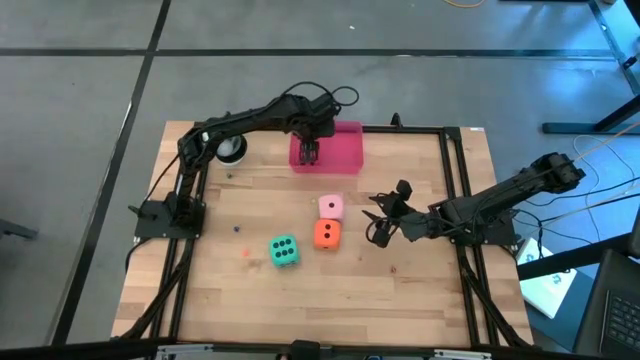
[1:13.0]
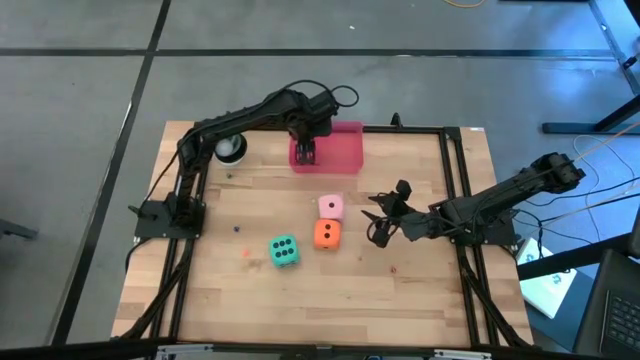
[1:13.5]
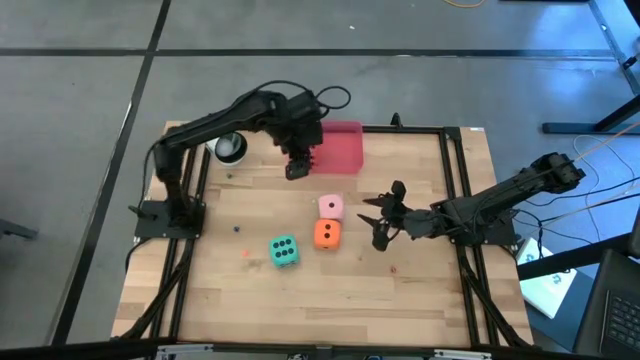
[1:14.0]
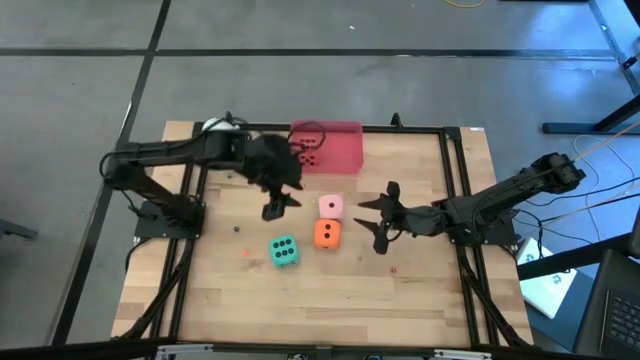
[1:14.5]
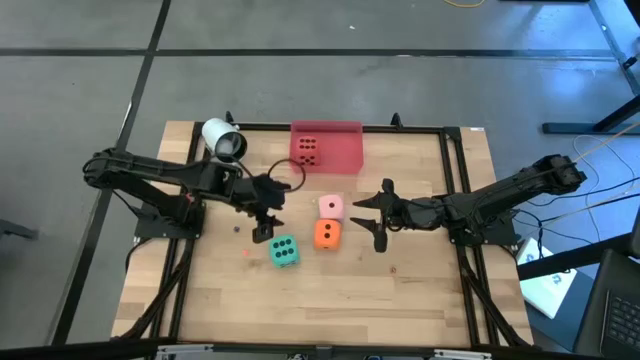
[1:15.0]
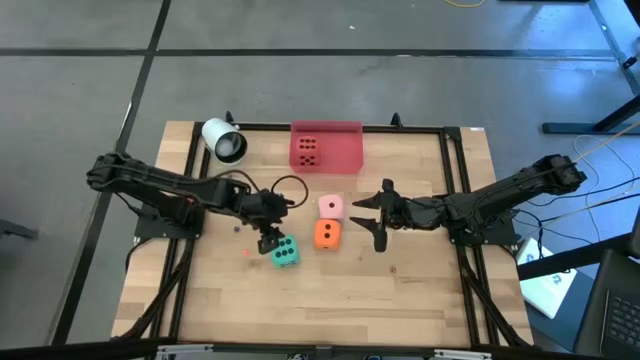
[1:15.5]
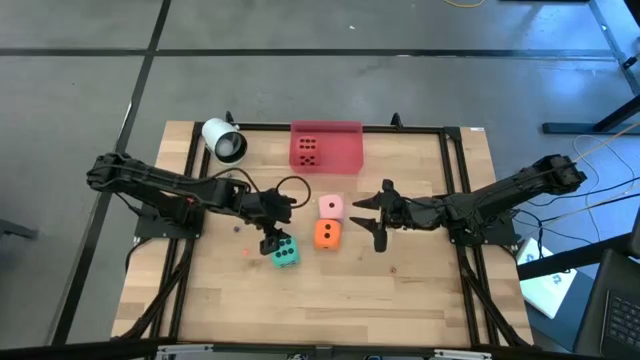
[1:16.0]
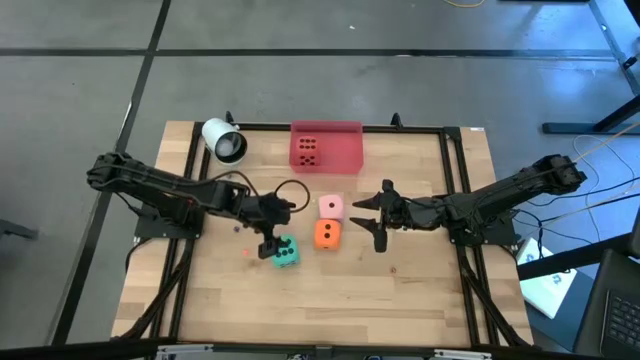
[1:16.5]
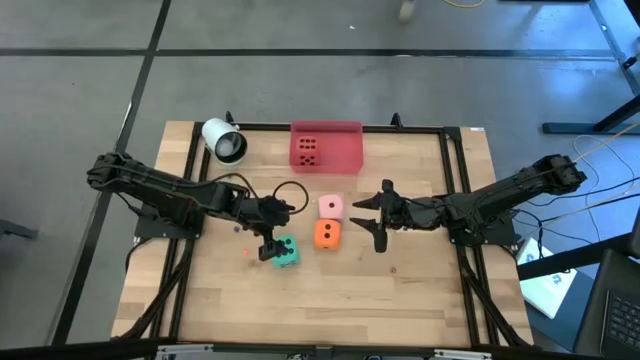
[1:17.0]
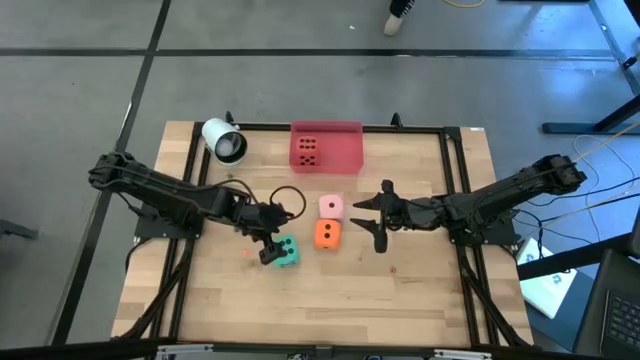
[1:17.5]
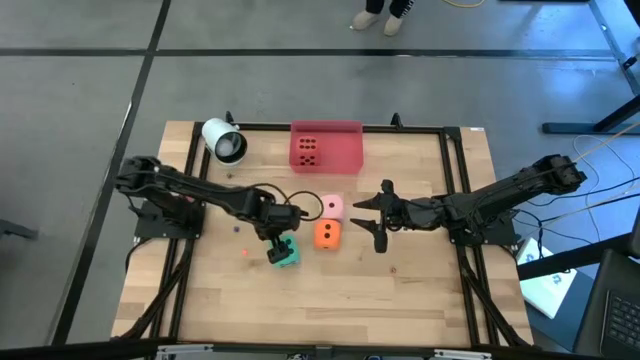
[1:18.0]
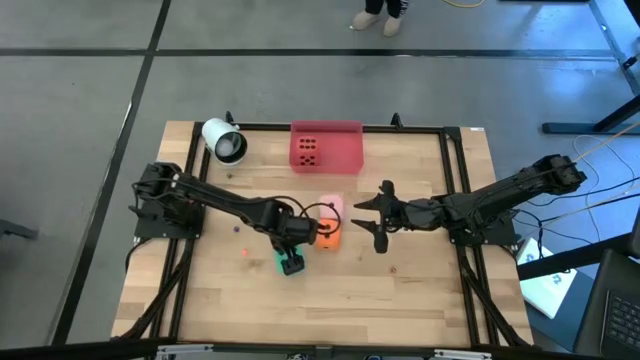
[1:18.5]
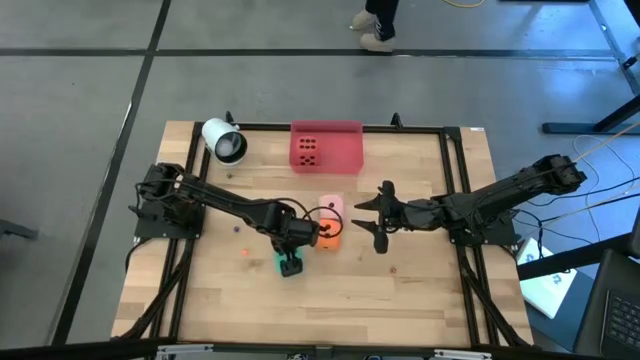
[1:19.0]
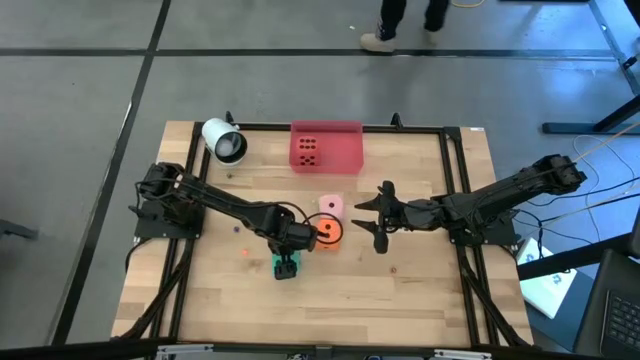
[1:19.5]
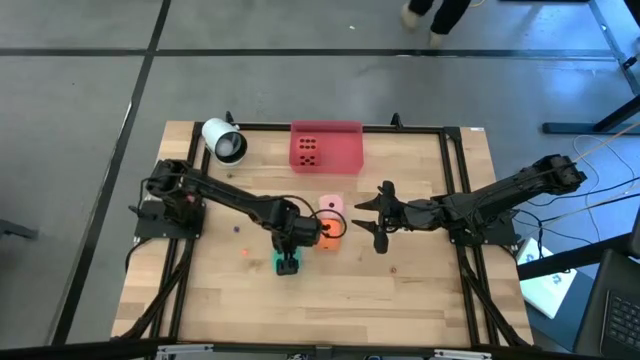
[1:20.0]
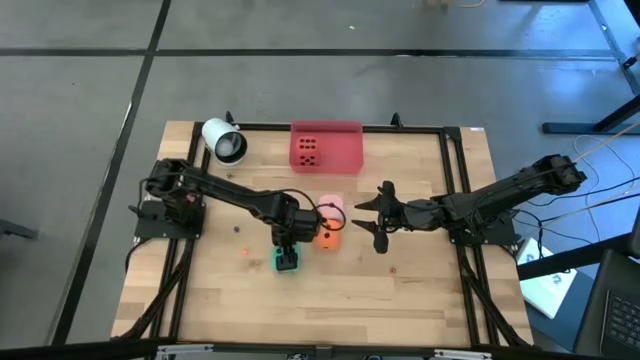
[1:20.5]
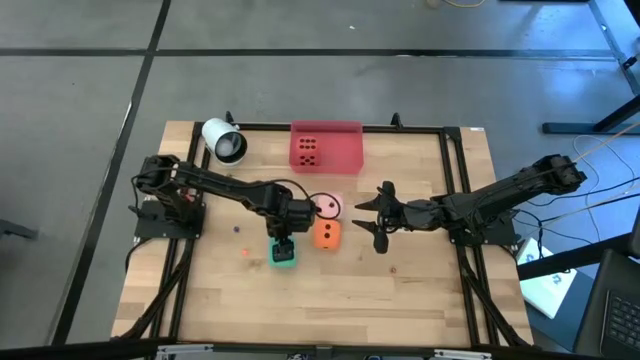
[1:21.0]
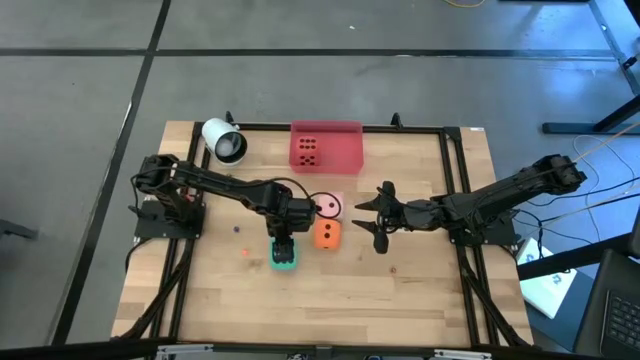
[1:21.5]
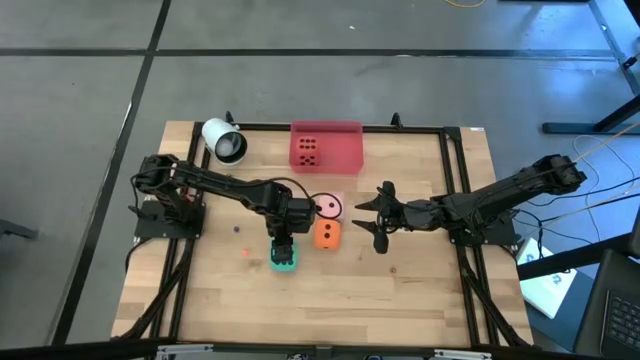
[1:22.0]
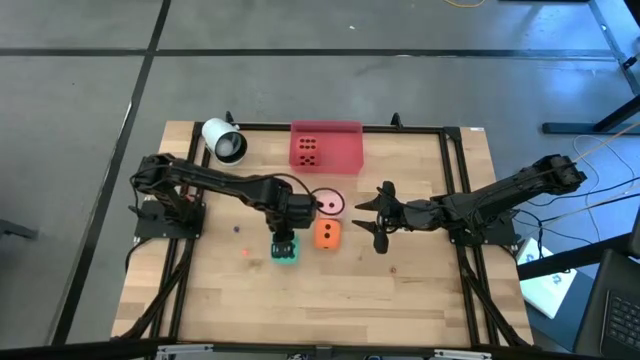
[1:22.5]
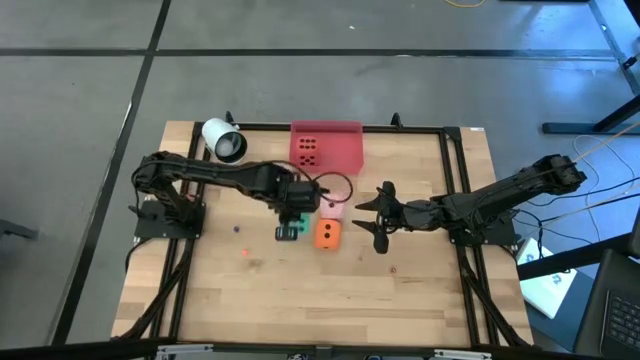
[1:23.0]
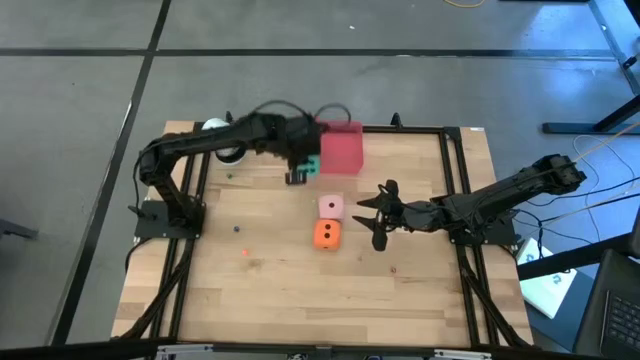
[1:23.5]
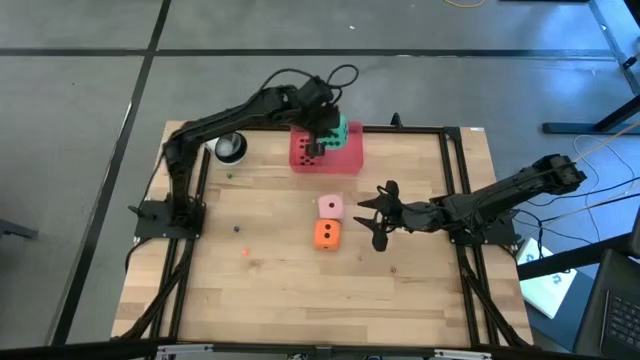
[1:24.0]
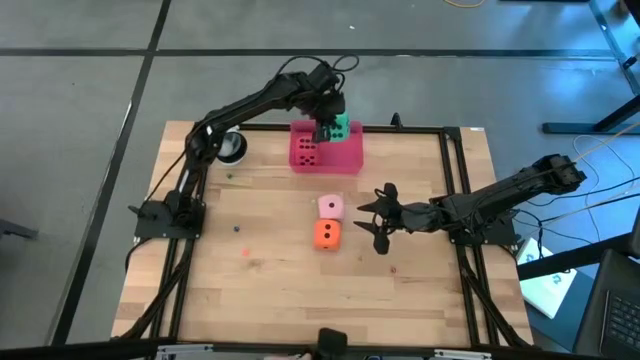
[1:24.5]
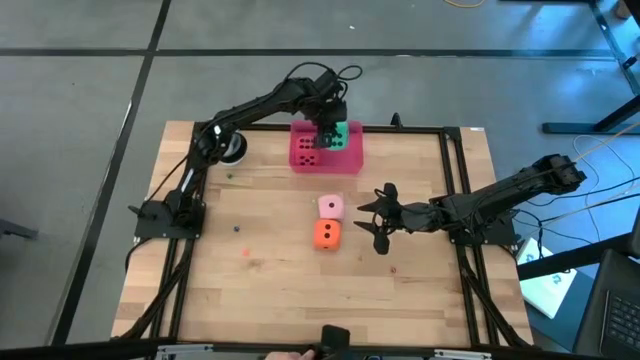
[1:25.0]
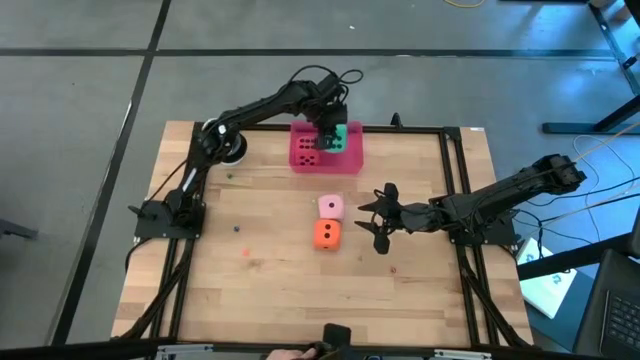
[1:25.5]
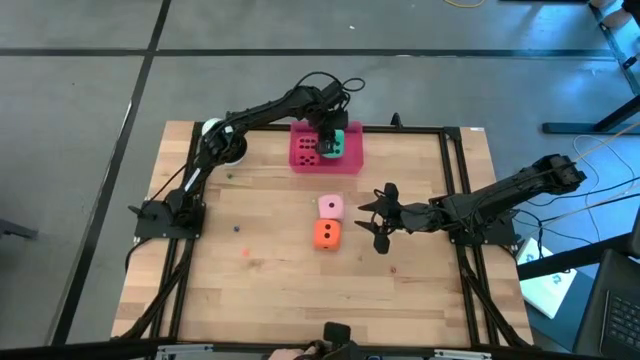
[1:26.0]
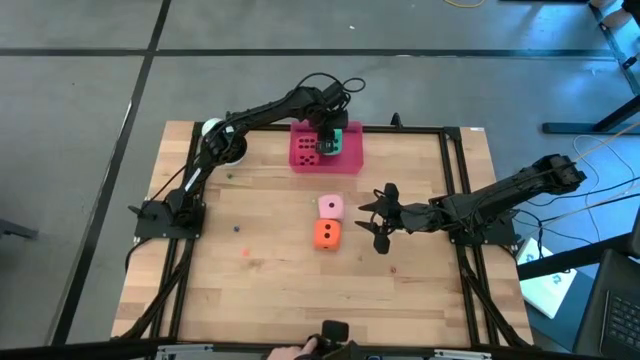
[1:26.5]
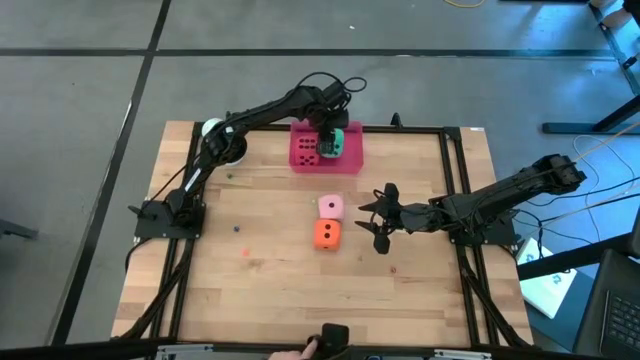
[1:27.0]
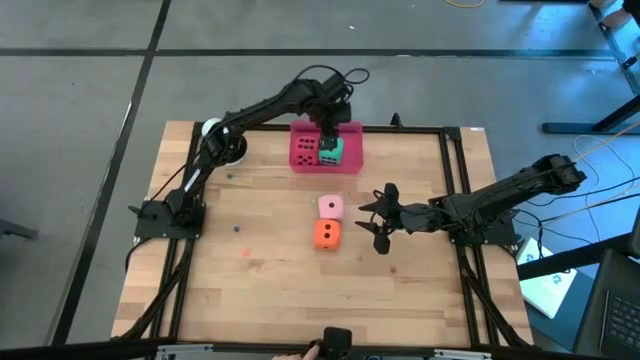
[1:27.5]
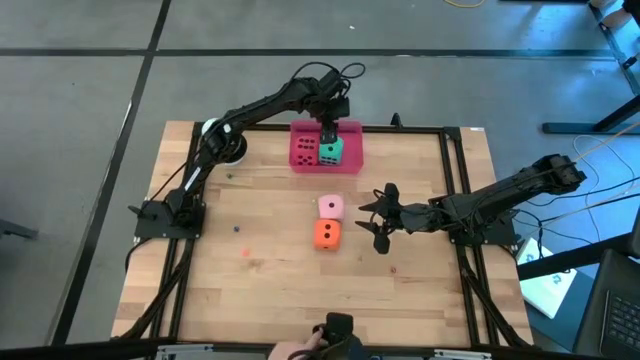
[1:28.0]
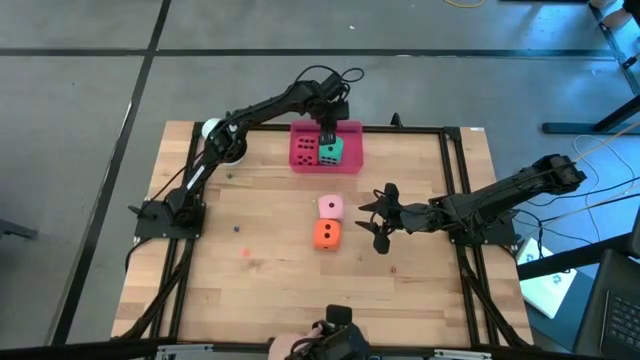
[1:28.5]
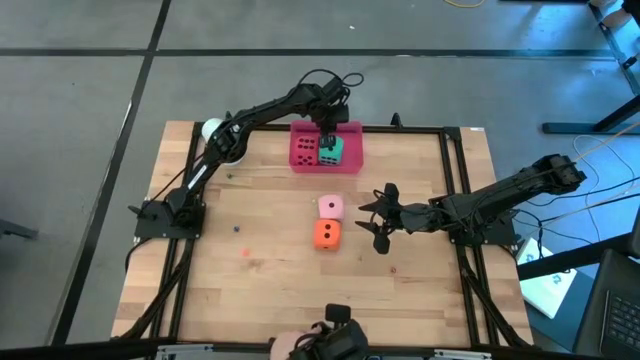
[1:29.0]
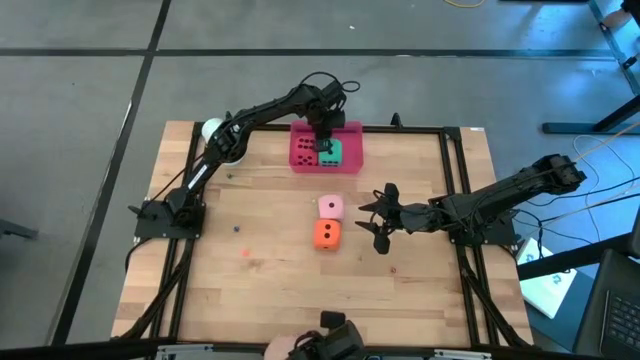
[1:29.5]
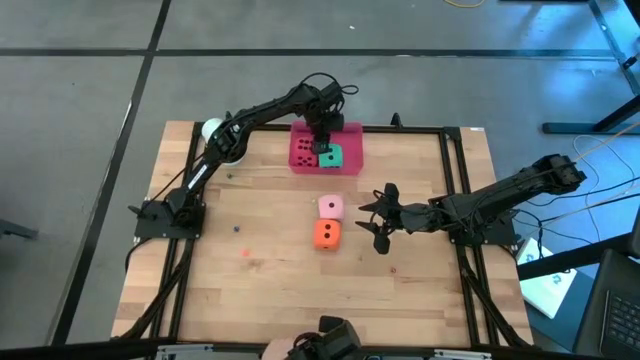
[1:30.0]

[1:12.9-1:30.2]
Task: Pick & Place Dice
Put the light blue die into the pink bin

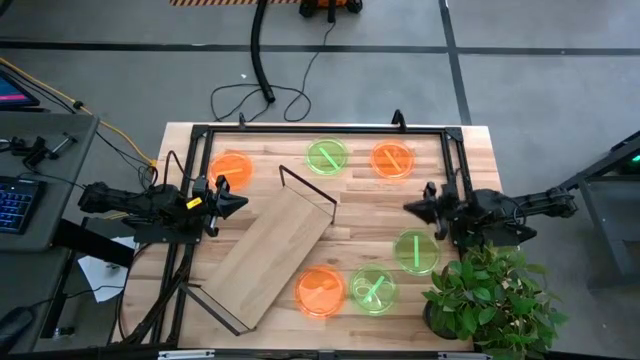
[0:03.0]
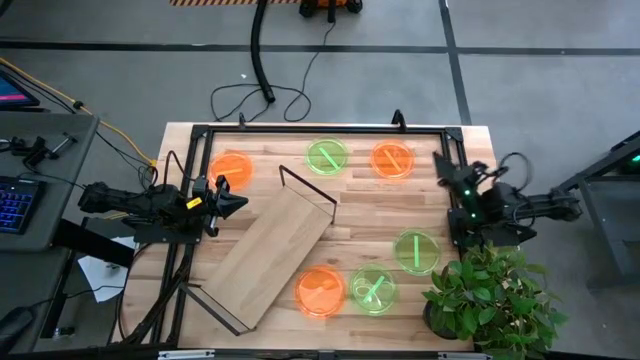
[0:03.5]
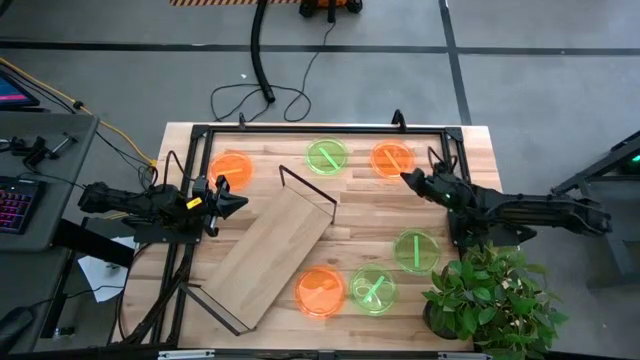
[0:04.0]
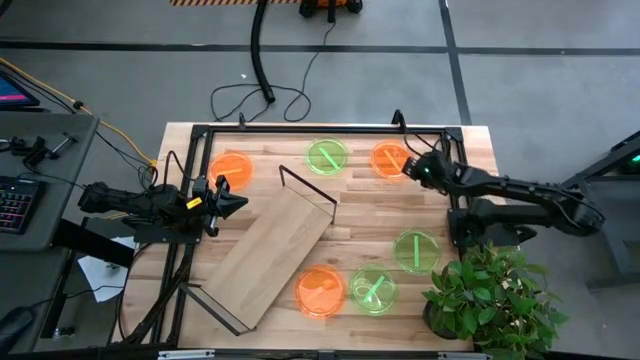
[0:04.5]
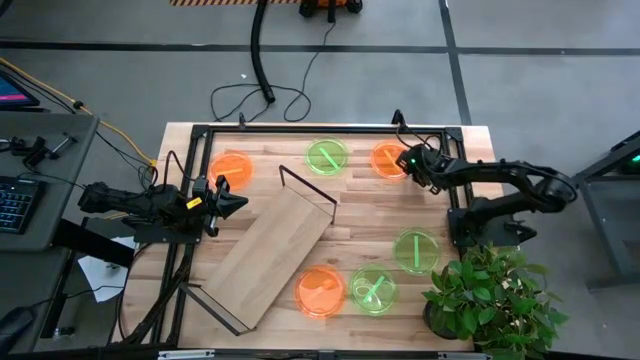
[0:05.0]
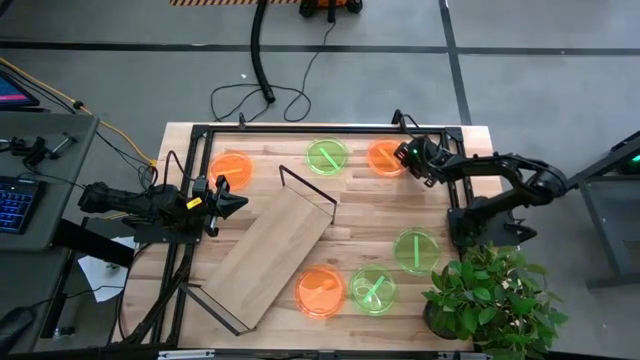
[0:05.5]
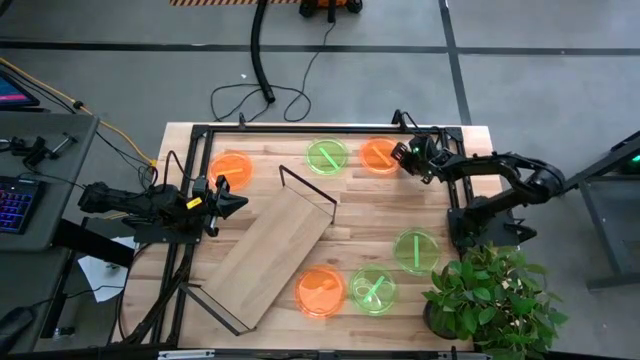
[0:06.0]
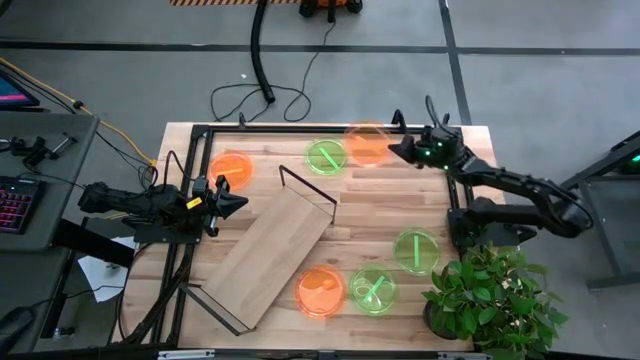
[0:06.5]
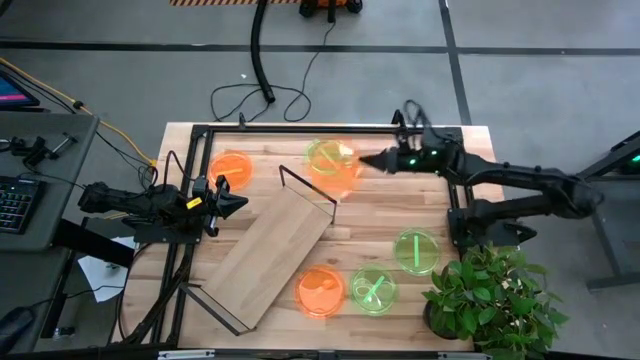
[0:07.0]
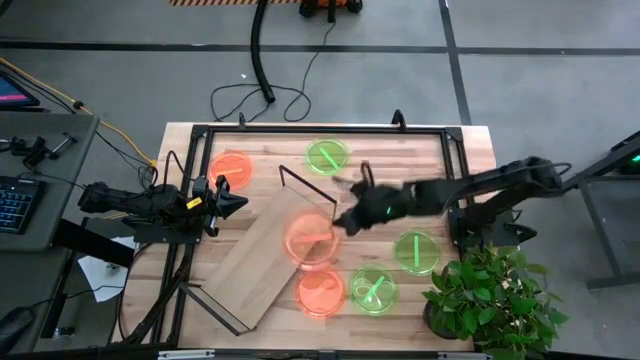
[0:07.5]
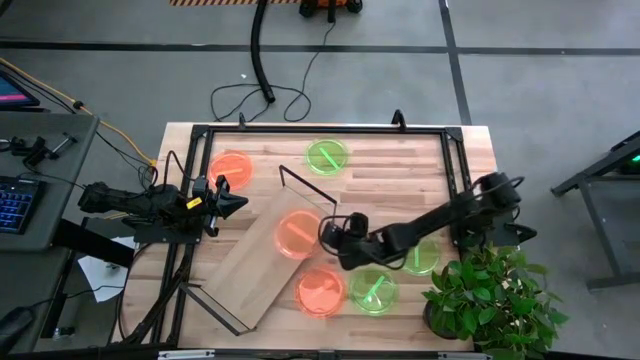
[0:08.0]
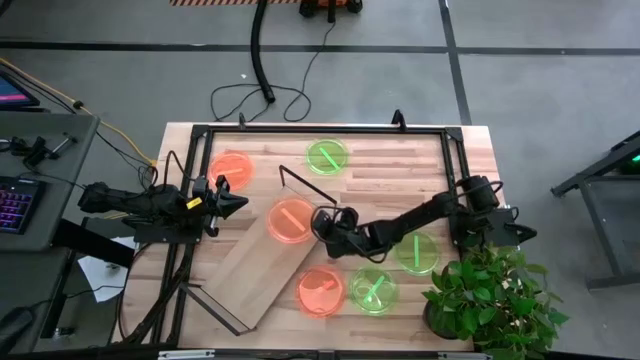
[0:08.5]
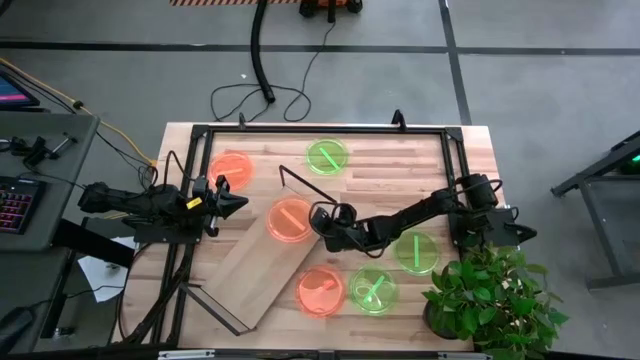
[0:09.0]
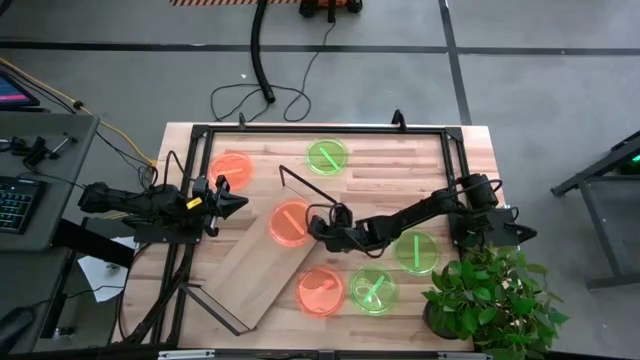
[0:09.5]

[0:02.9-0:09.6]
Task: Place and stack plates onto a shelf
Put the top orange plate on the shelf
